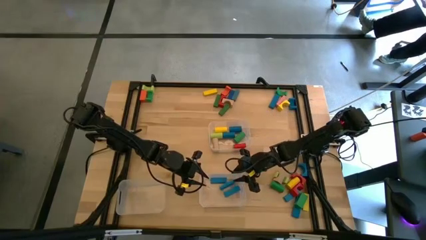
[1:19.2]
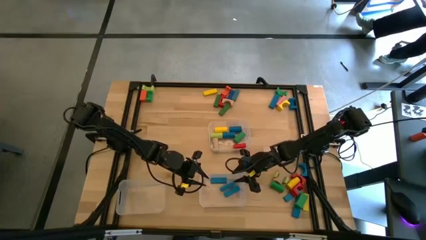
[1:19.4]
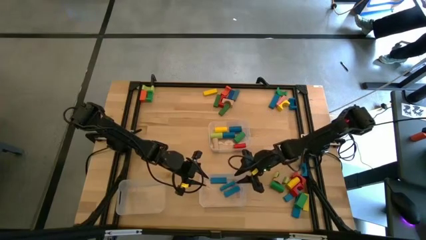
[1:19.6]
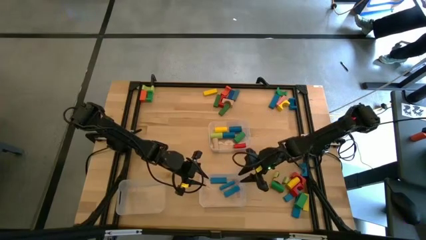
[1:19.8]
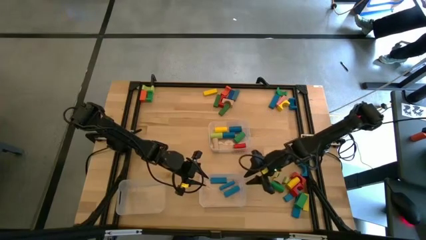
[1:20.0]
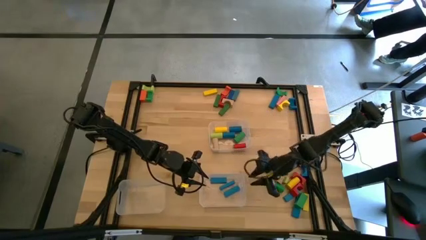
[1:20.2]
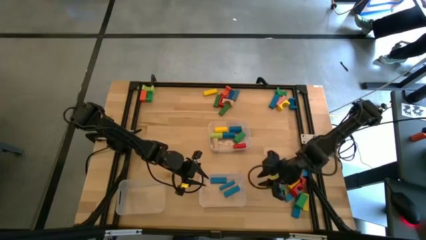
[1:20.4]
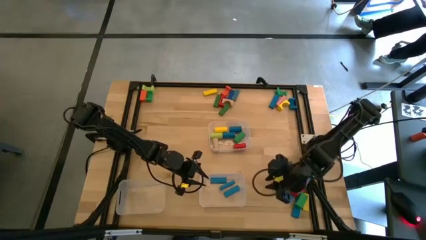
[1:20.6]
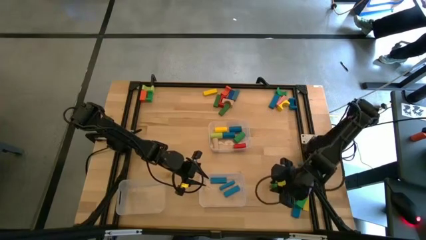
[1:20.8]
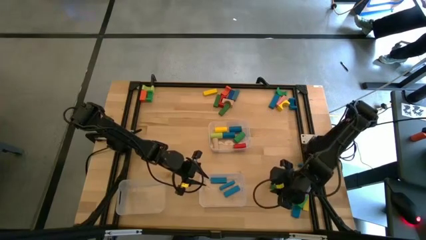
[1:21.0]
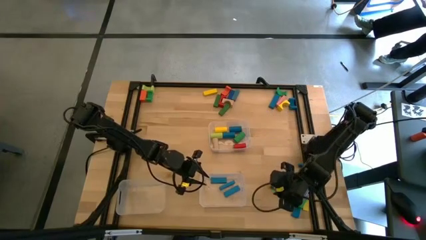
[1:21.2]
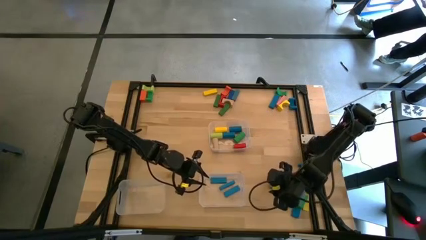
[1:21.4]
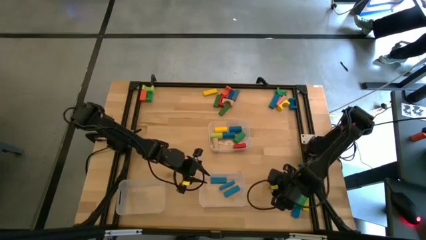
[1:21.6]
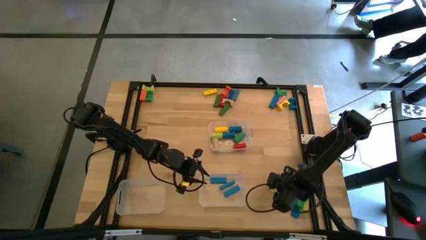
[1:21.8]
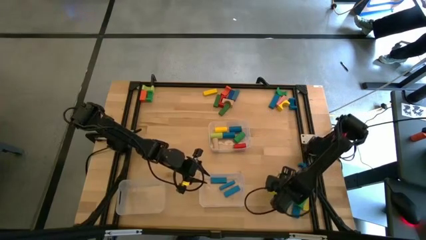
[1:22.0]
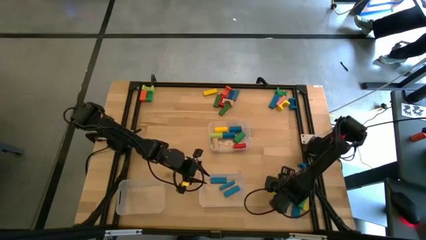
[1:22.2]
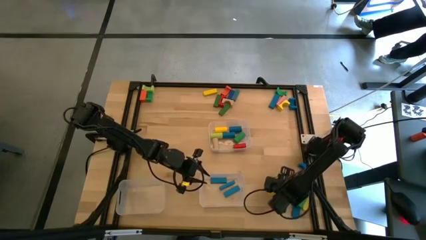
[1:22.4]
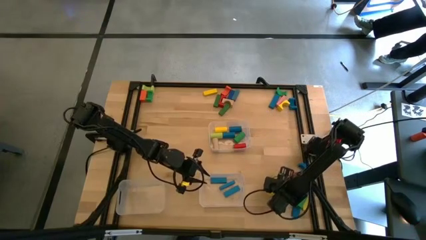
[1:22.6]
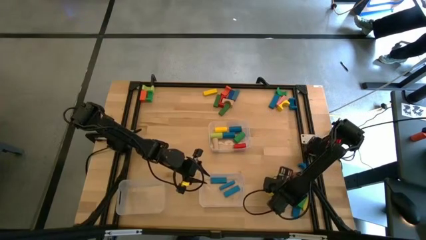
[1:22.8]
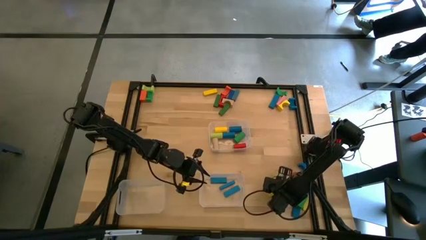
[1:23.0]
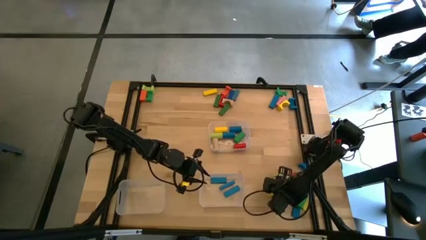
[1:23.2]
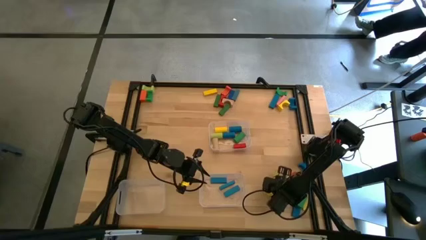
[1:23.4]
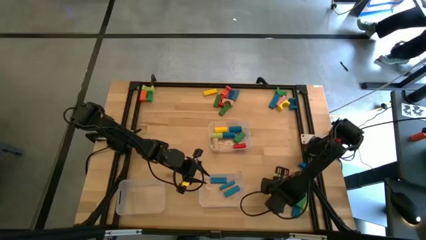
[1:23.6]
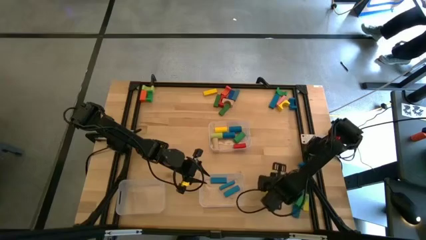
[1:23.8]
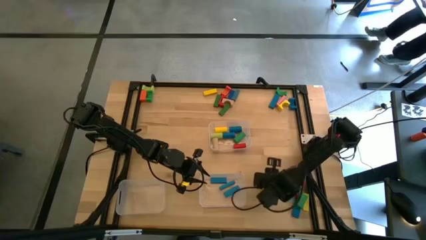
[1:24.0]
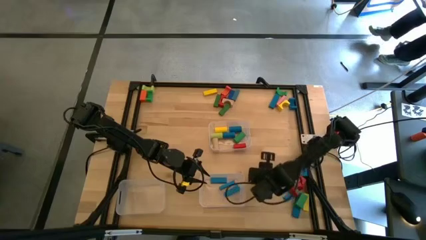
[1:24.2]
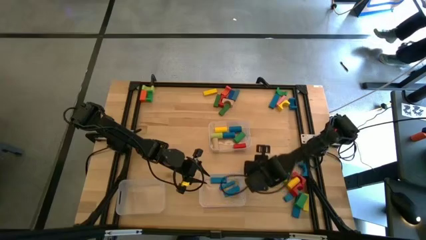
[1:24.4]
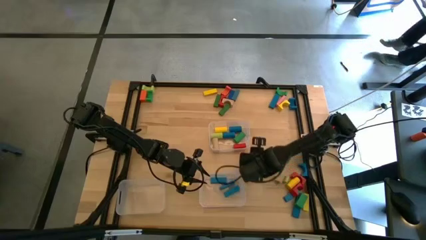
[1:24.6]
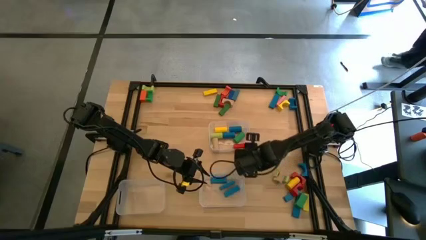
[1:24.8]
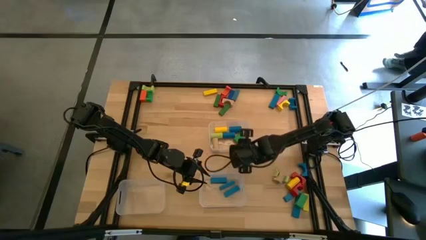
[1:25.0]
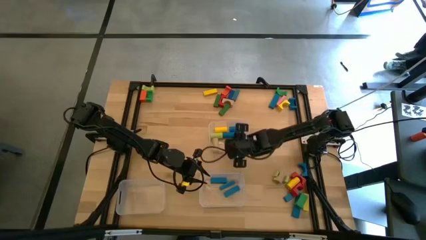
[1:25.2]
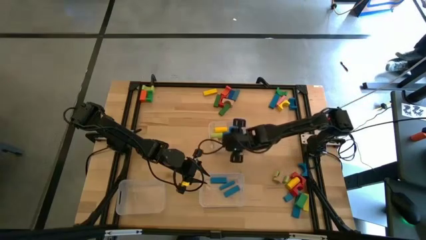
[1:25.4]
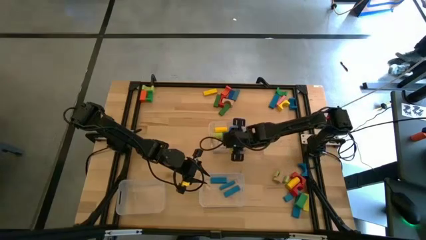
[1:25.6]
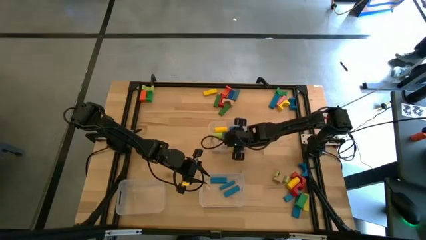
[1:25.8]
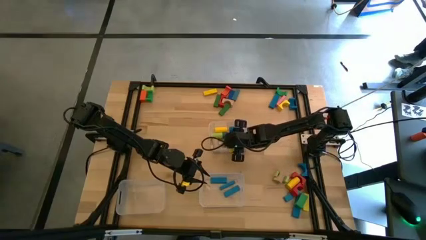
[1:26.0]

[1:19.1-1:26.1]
Task: Sort blocks by size
Put the green cylindrical block into the top transparent bin

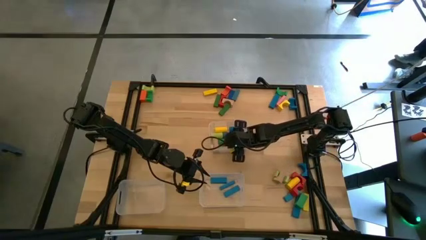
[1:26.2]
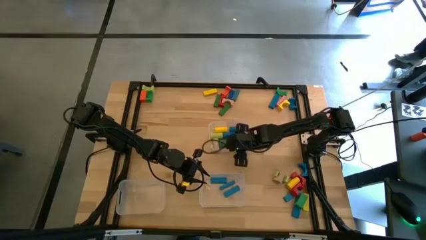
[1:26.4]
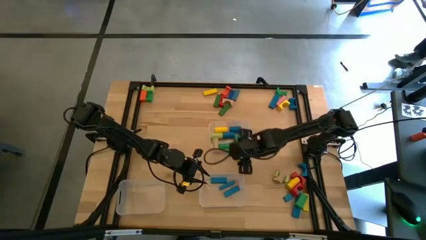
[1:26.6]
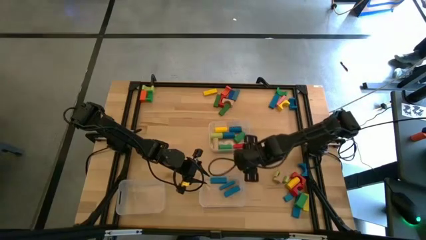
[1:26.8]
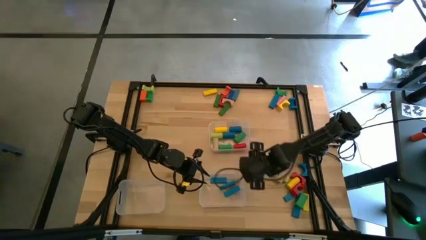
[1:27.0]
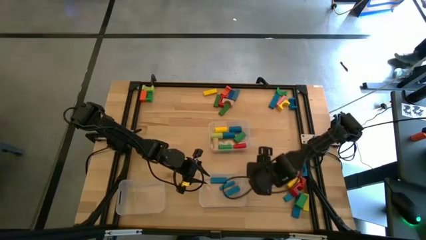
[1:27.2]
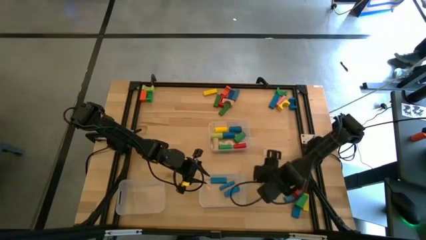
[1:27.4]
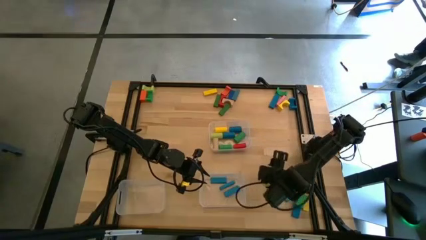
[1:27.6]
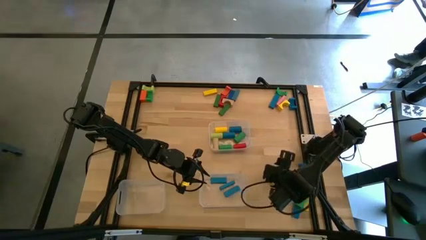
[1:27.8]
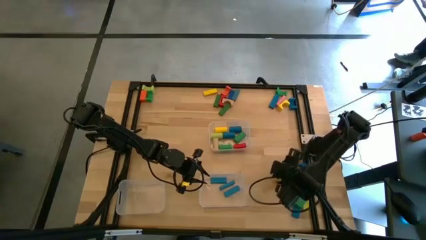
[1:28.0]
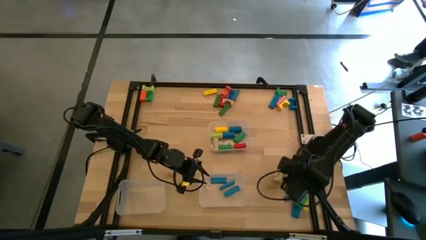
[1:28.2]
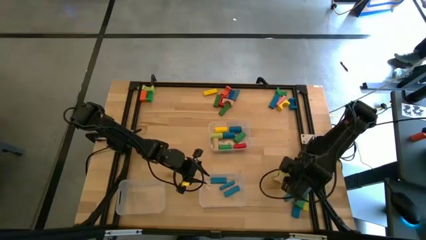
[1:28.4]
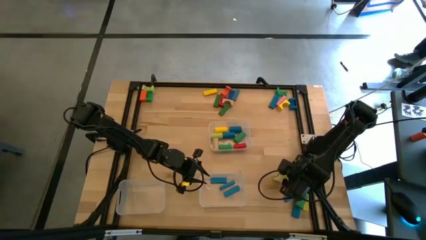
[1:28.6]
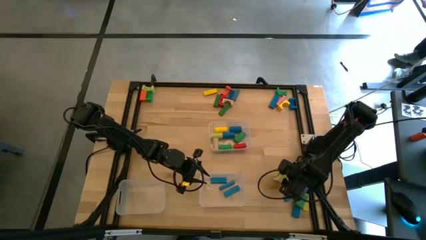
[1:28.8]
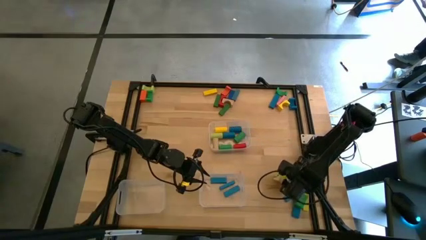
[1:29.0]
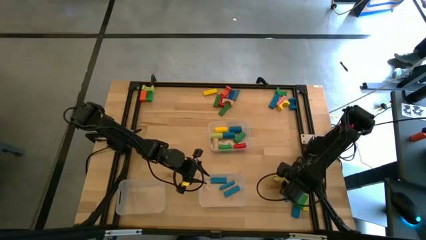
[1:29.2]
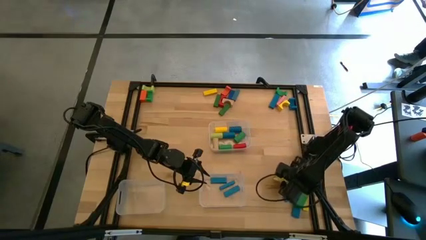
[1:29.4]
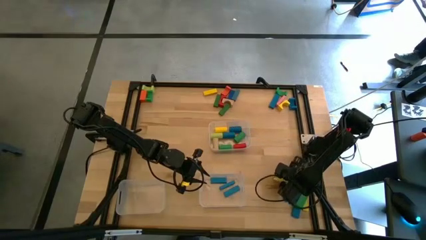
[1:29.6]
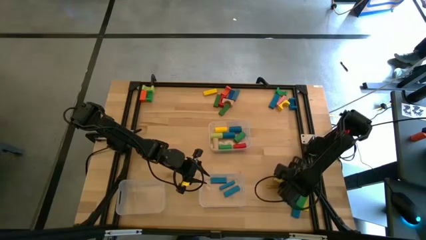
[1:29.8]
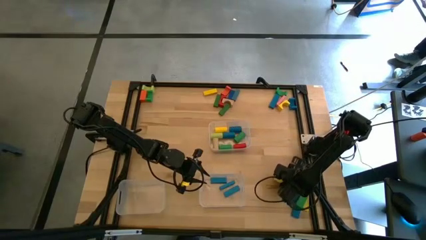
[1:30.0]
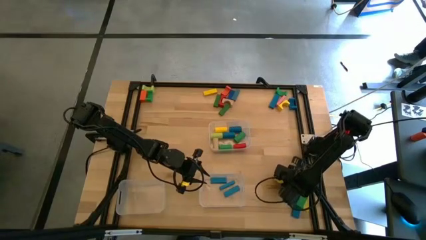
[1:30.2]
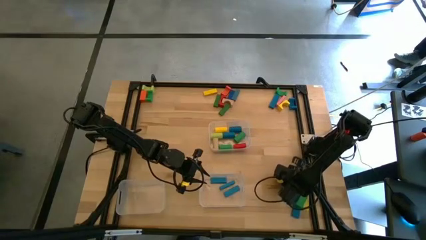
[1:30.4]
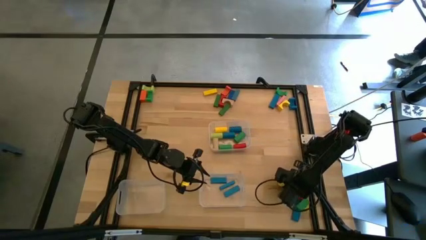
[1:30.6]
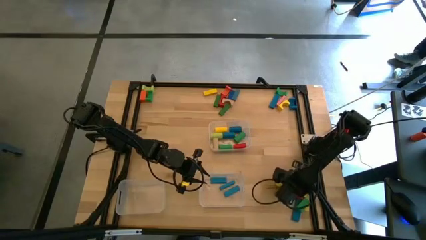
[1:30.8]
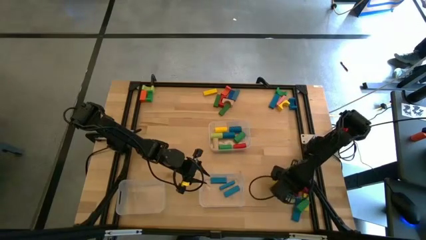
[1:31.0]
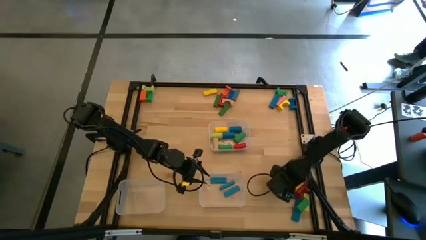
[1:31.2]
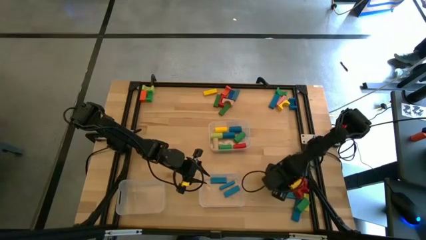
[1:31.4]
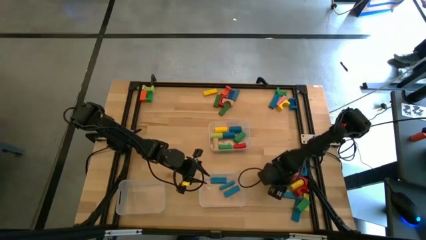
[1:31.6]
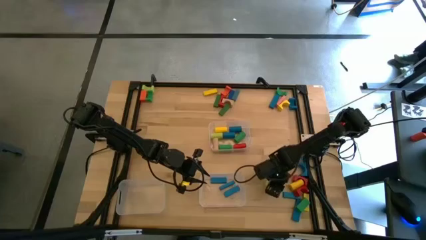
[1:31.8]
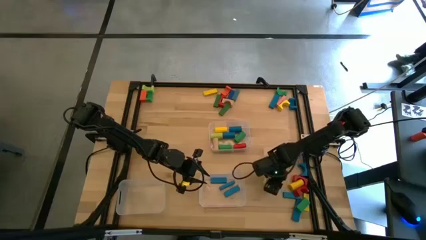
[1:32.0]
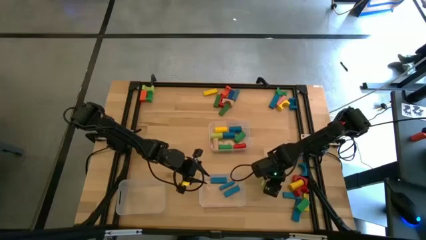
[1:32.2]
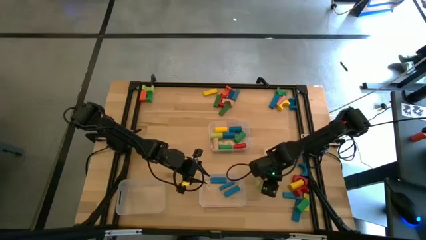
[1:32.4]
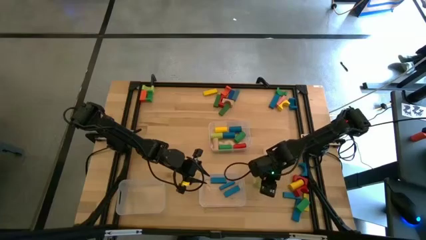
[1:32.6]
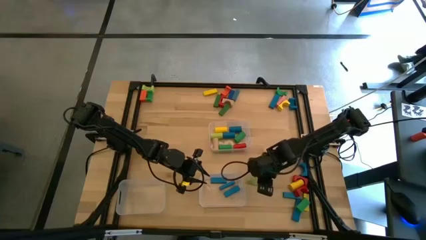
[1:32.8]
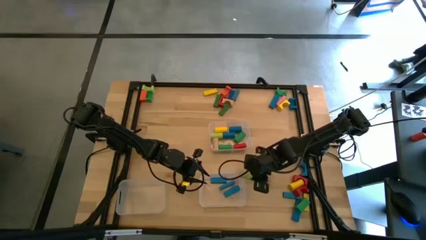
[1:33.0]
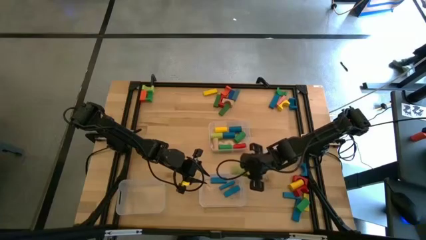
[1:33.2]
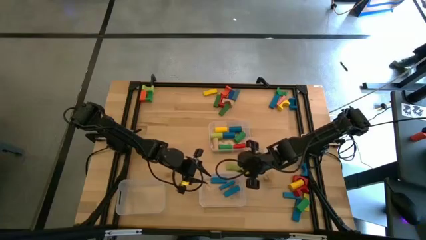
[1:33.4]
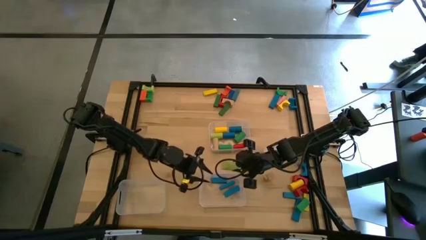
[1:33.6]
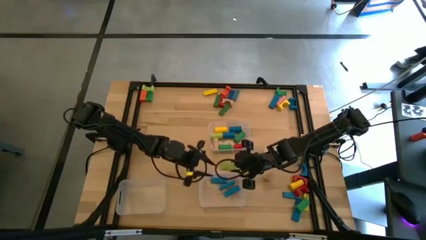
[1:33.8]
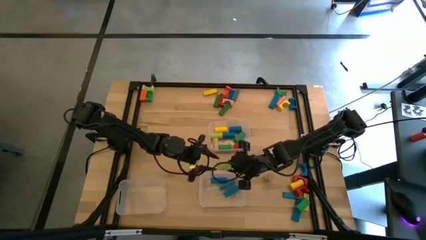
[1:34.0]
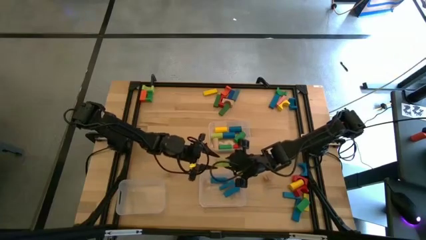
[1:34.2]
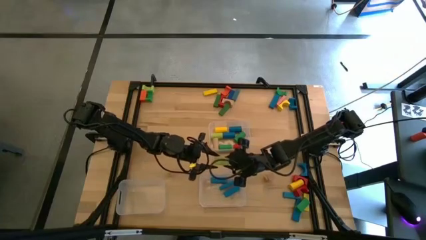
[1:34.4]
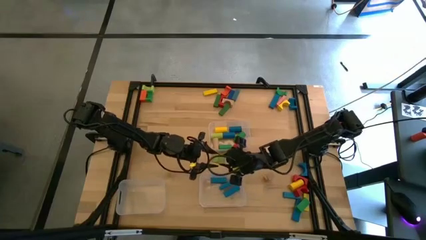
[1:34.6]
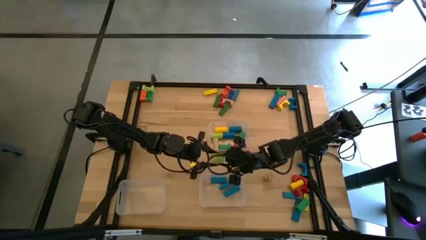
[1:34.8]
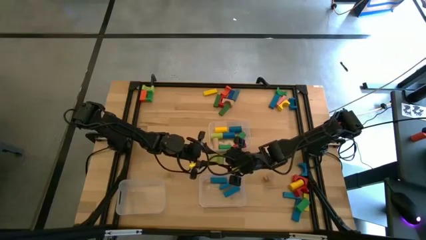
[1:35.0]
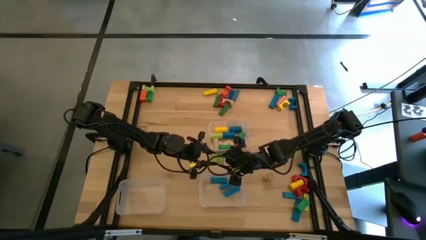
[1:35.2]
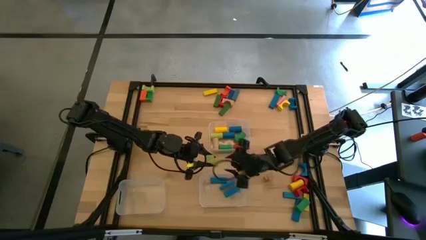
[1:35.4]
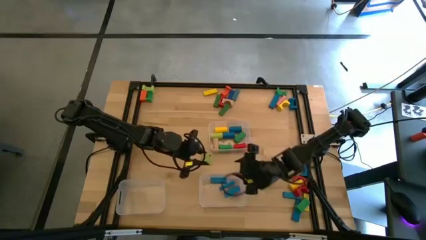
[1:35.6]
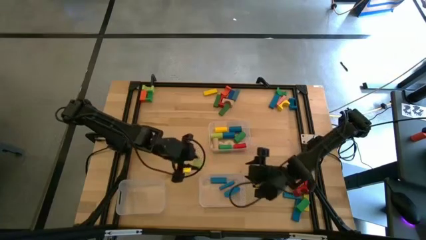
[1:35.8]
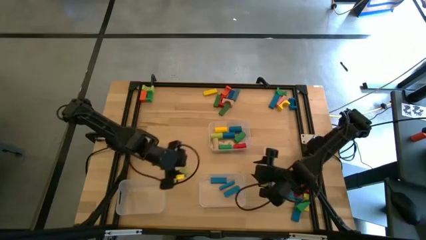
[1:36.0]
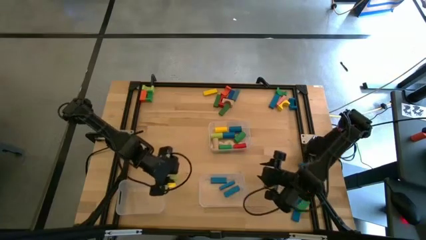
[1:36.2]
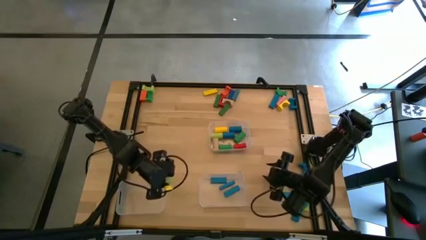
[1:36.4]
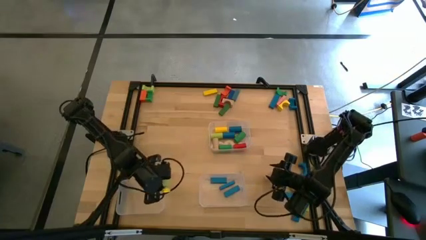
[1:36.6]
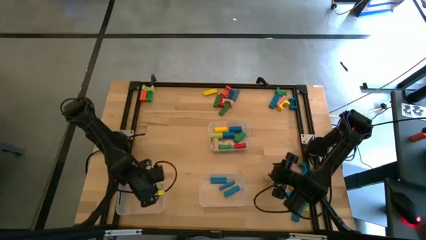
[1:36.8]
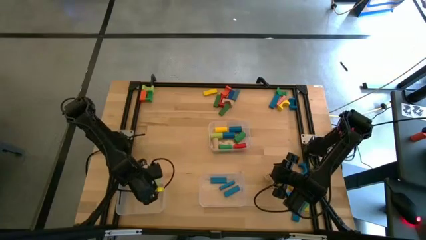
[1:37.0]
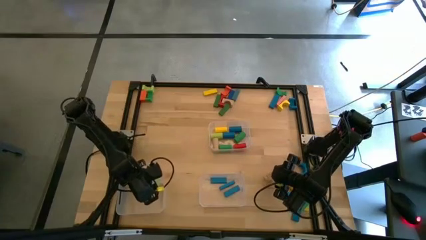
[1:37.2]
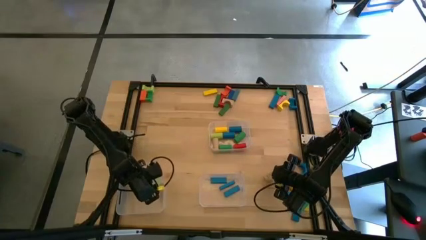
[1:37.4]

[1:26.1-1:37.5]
Put the light green arch block into the bottom left transparent bin
